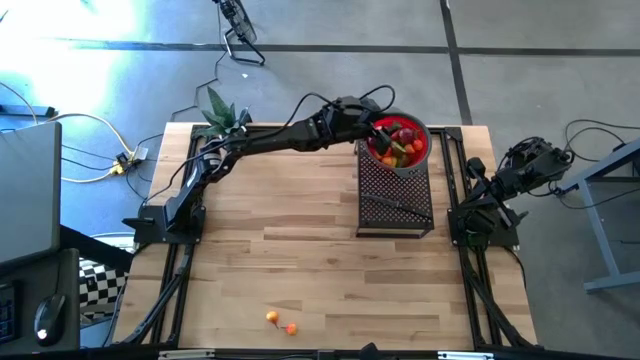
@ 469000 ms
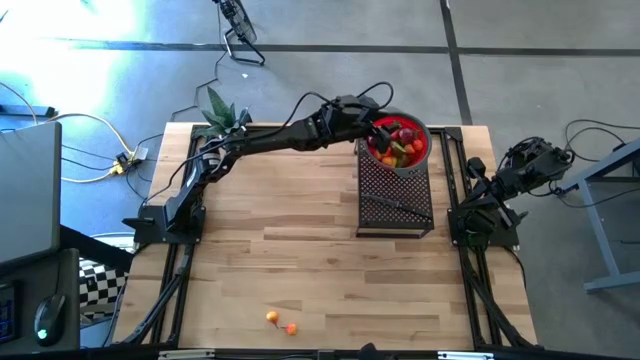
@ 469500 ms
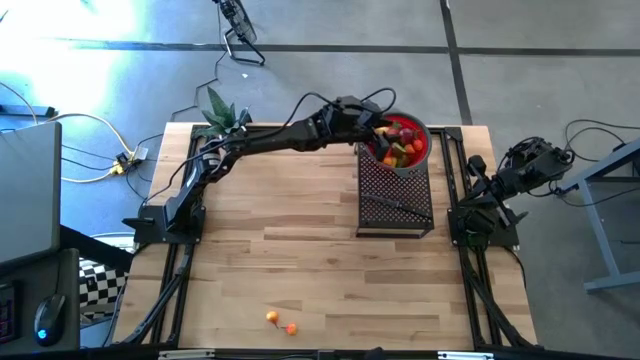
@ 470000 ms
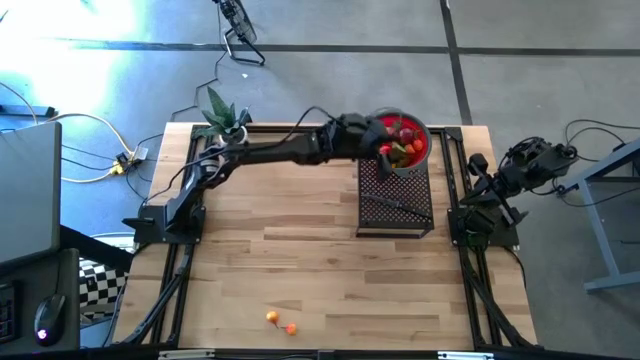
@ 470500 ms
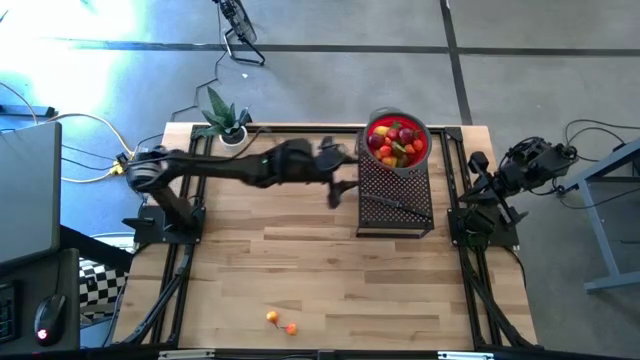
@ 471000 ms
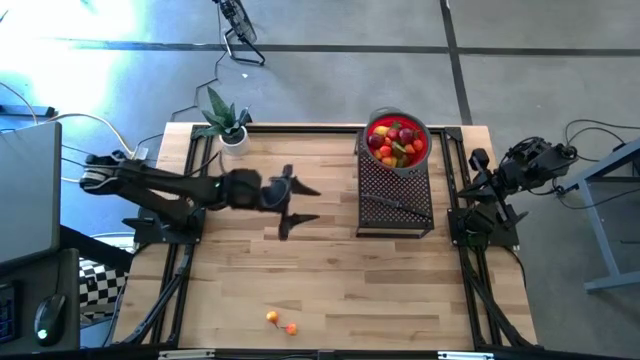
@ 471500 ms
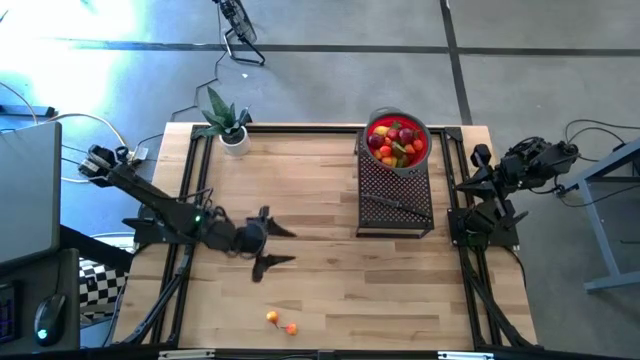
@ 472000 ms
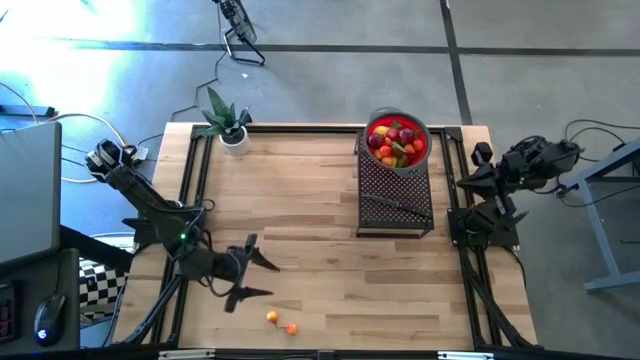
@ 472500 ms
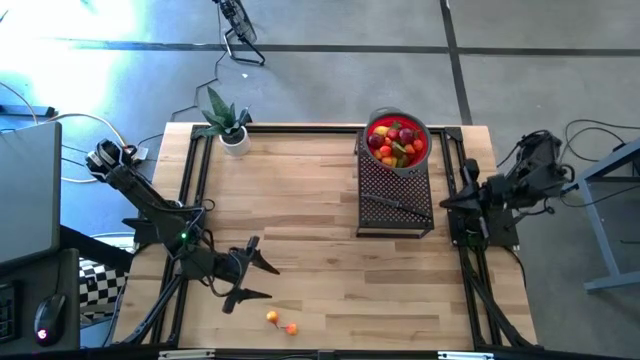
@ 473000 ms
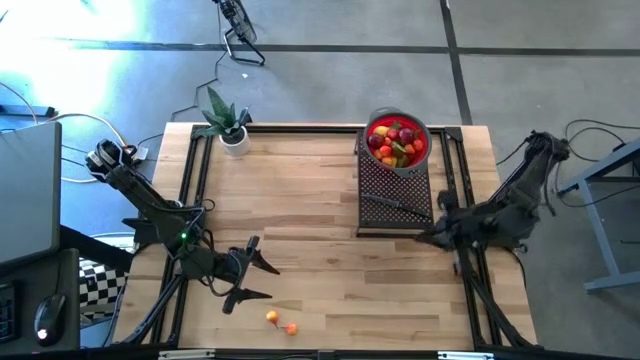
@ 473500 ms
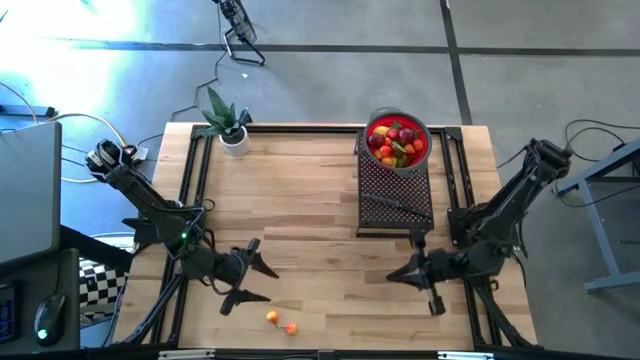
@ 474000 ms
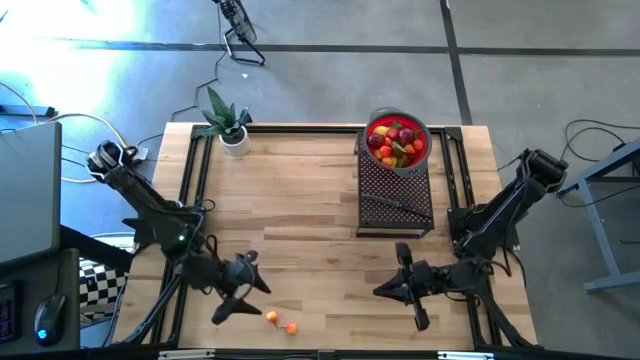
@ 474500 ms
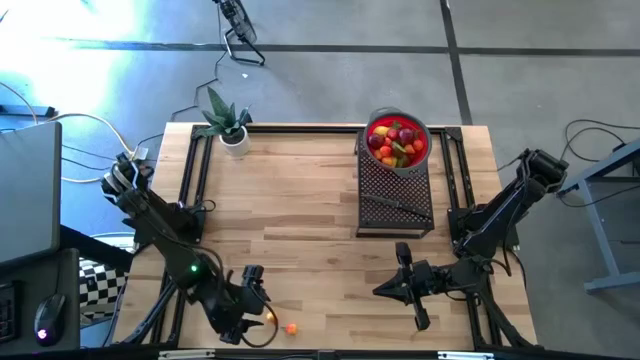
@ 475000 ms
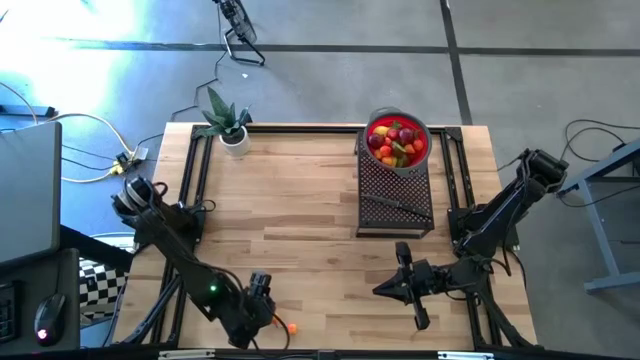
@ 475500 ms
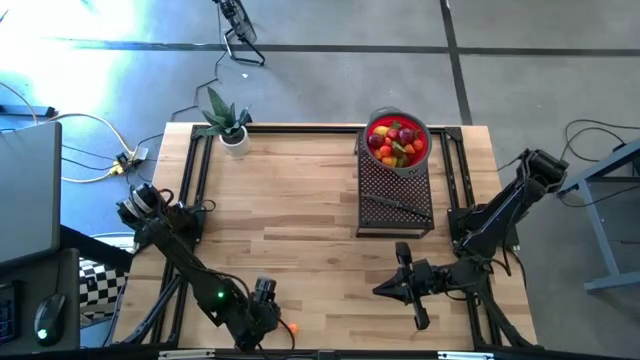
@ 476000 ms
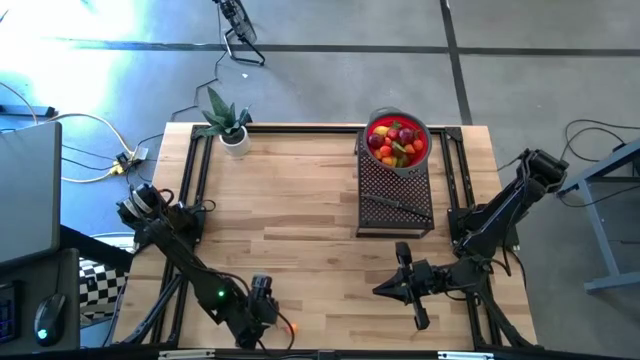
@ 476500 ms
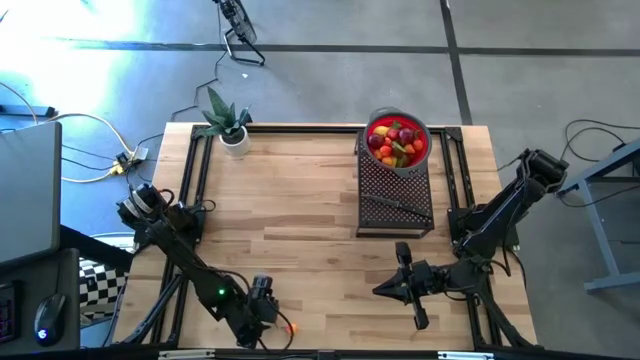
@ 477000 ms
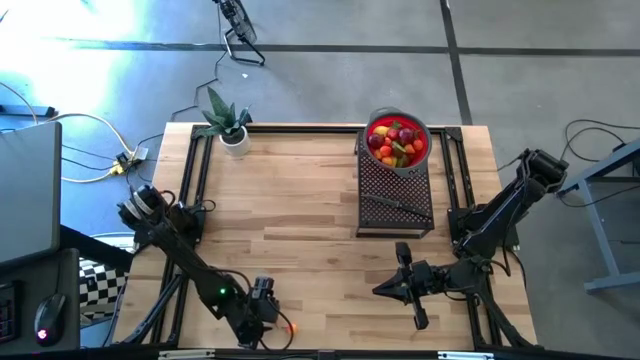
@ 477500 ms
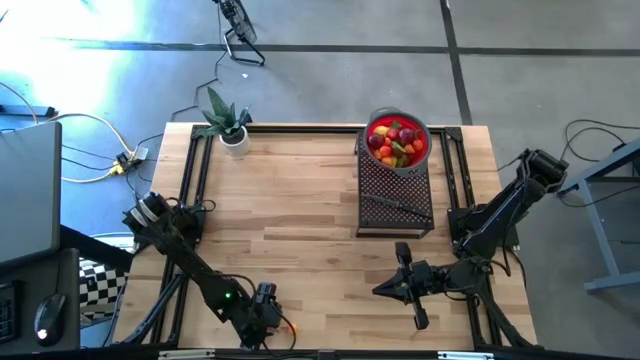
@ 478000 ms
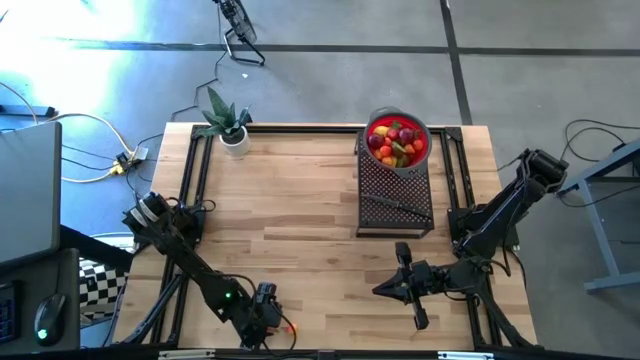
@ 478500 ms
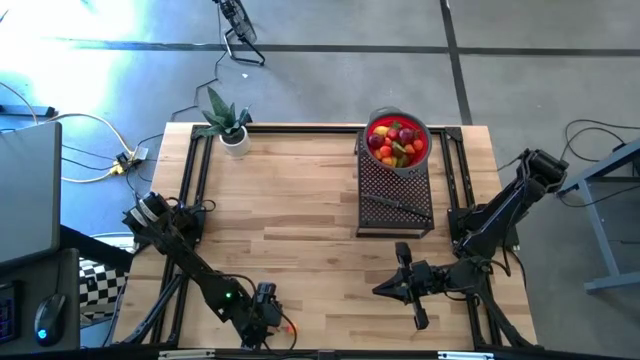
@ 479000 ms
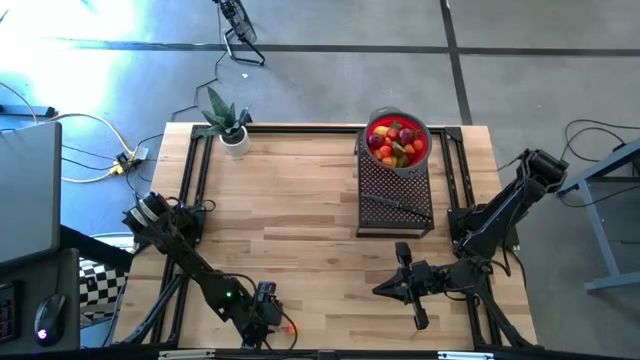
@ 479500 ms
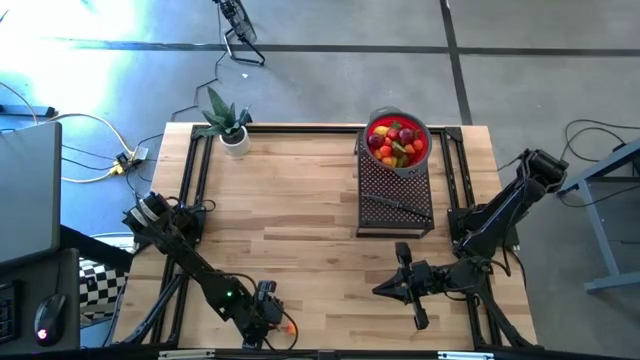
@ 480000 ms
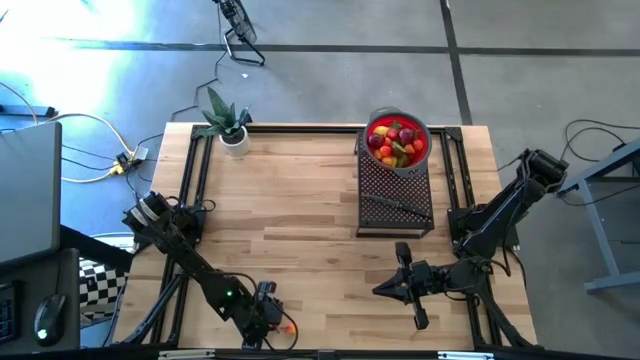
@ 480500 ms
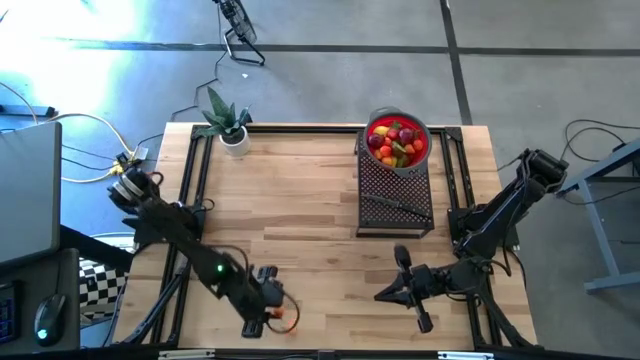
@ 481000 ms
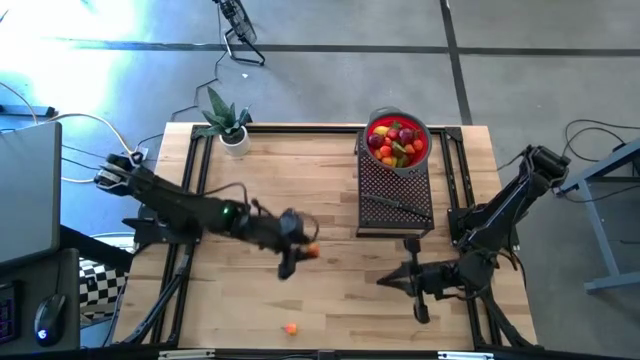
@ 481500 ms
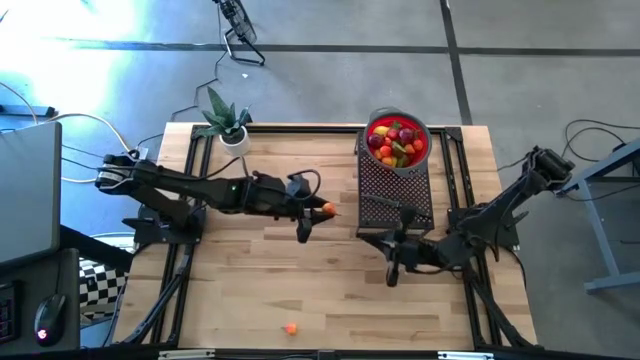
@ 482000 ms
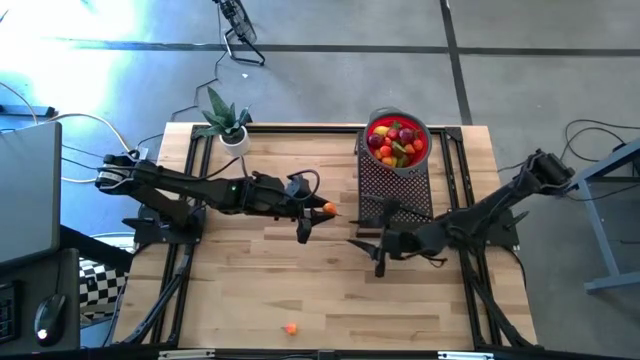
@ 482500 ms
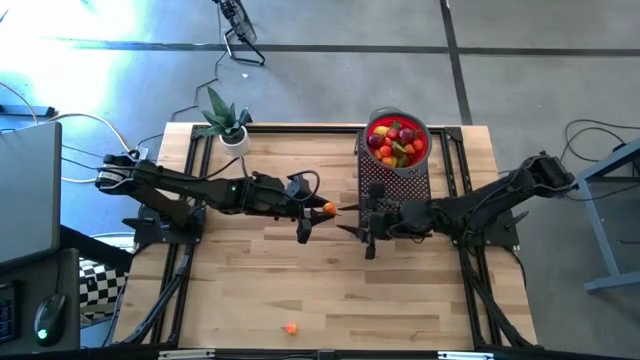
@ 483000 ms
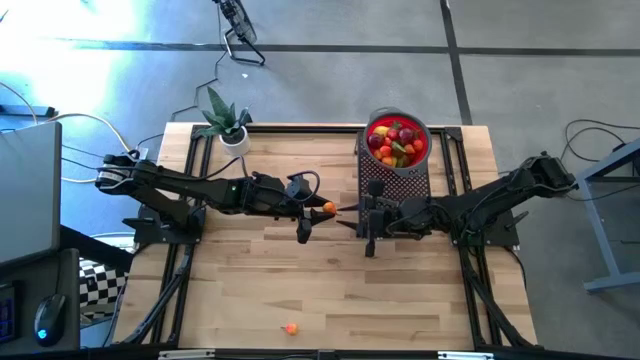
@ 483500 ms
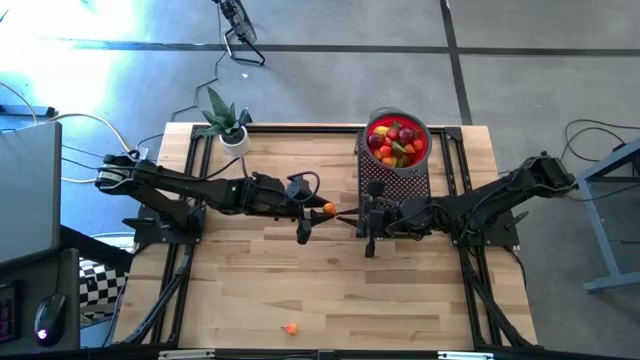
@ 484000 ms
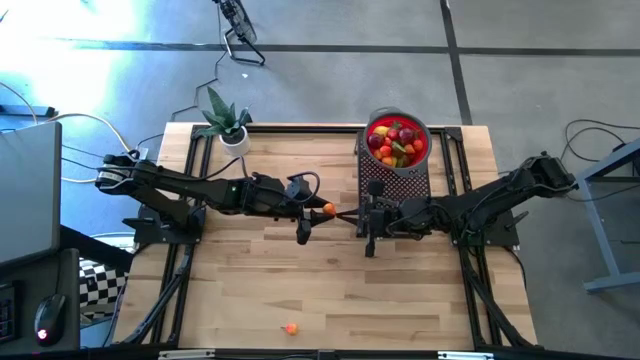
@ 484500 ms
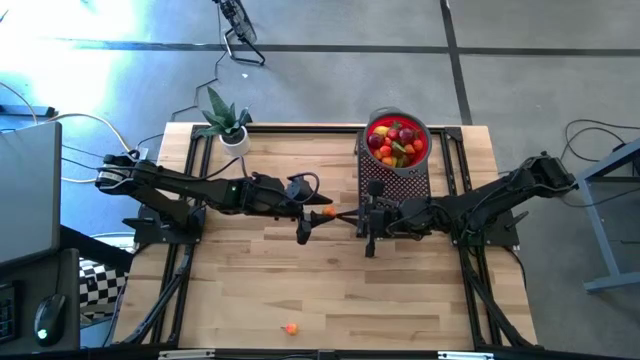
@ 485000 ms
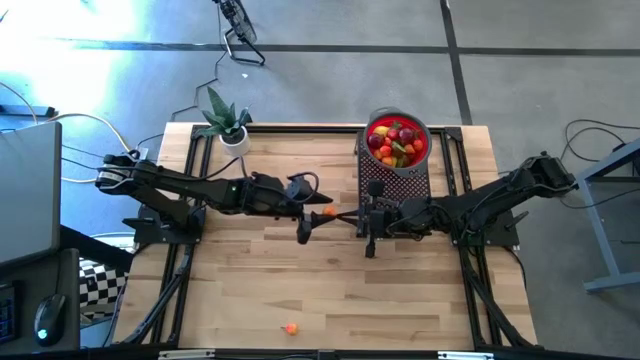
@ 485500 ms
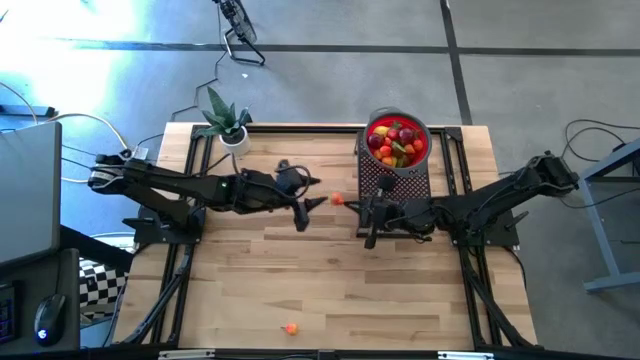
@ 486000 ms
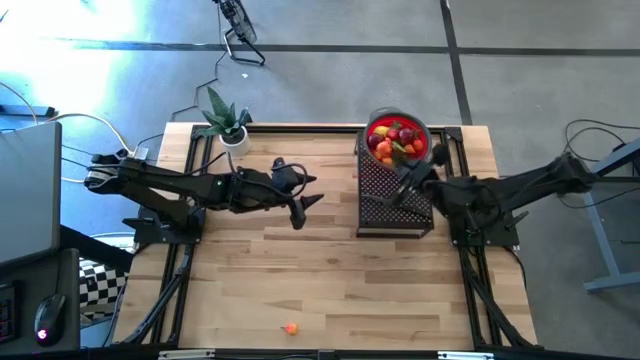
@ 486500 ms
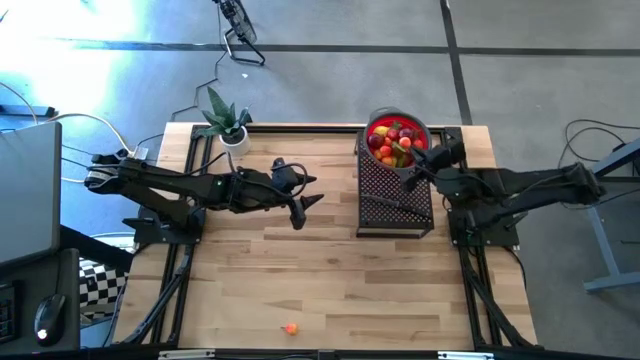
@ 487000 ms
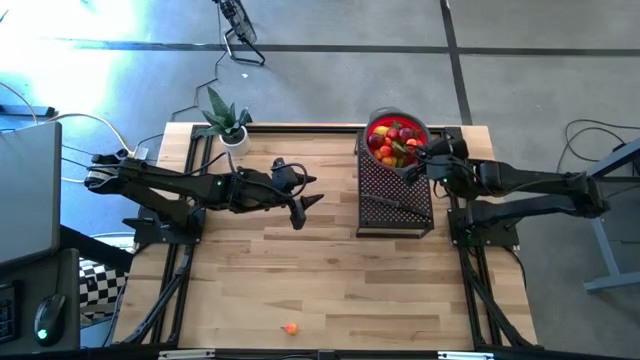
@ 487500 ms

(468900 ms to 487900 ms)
Task: Pick & Place Fruit
Put the pear into the strainer bowl on the shelf

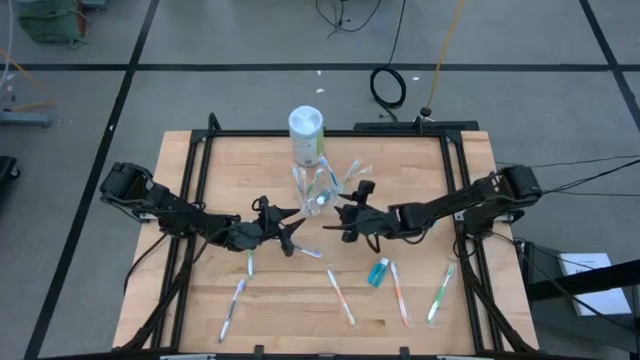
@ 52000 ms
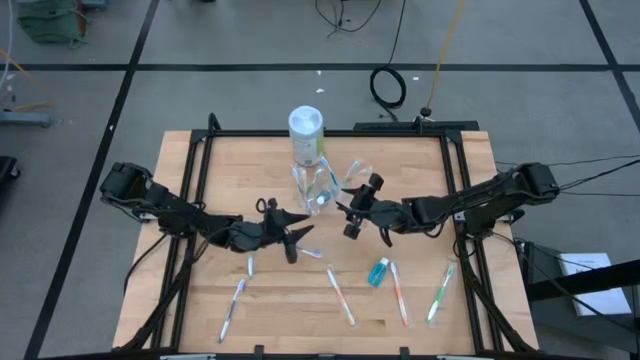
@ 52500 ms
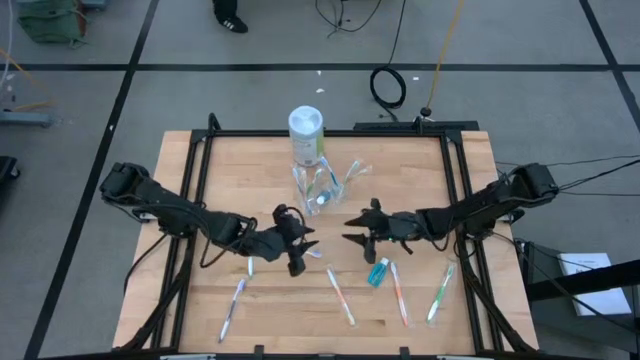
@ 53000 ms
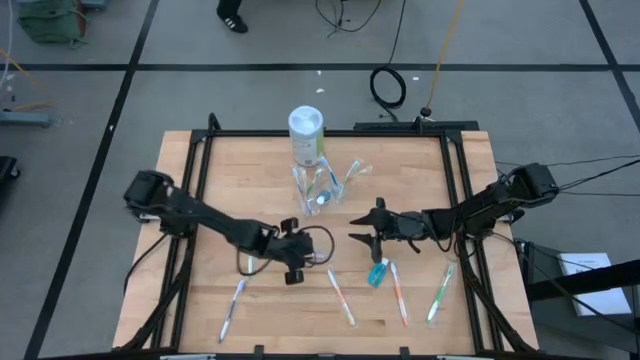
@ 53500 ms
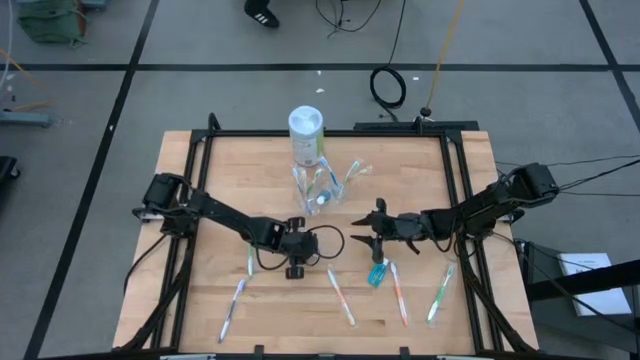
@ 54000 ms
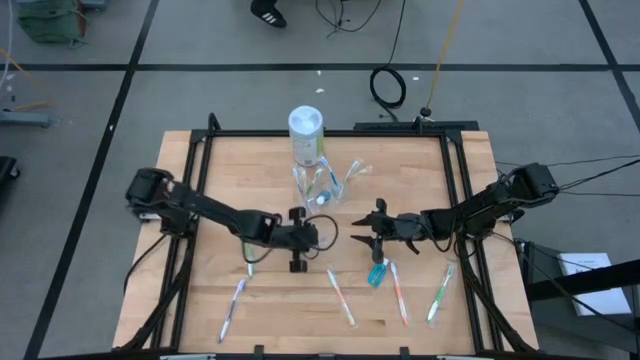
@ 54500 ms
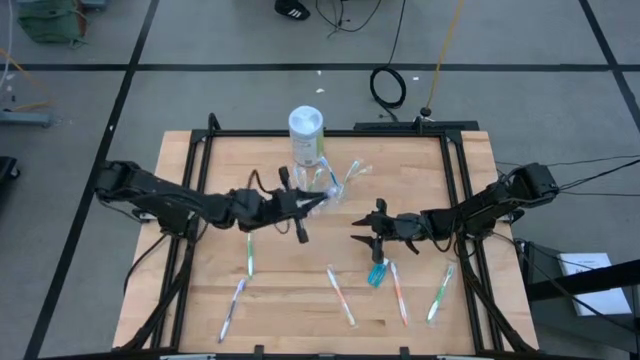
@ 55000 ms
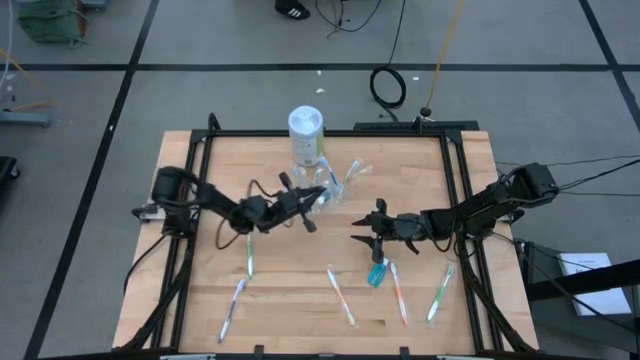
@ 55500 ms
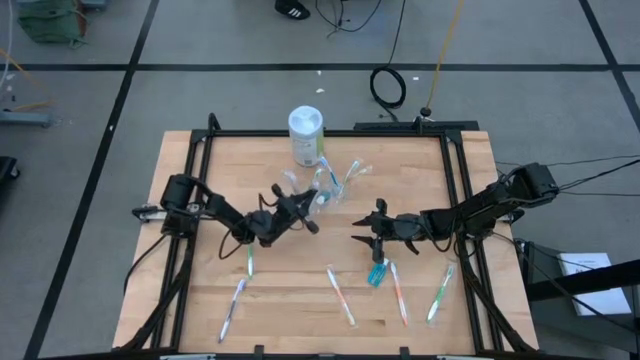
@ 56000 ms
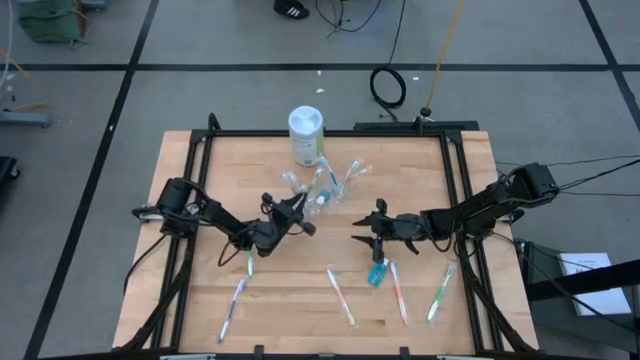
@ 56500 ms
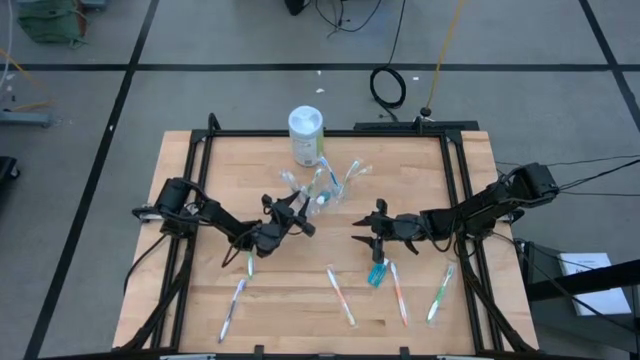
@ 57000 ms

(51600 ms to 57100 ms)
Task: Pick & Place toothbrushing station
Put the purple toothbrush into the transparent organizer
